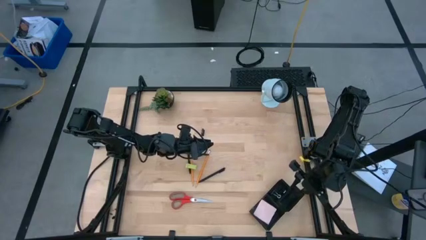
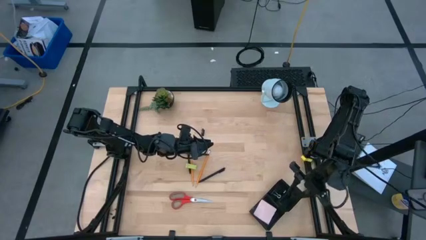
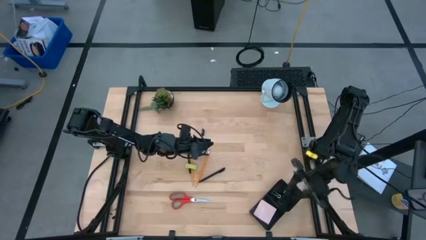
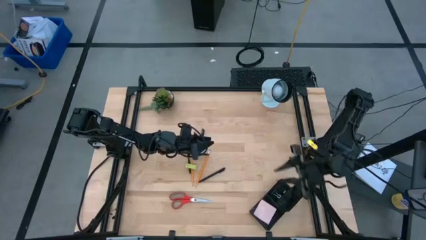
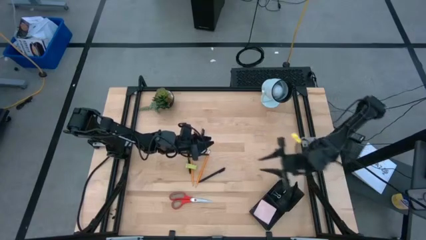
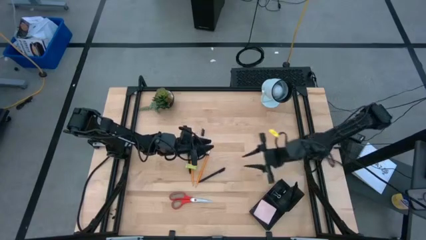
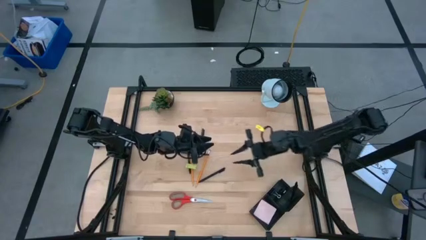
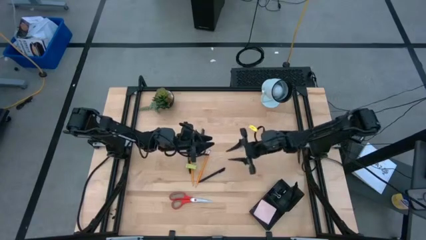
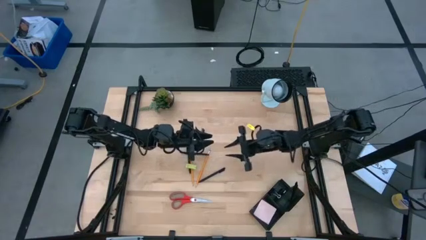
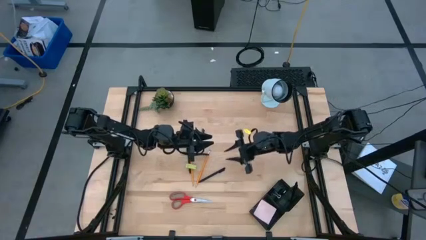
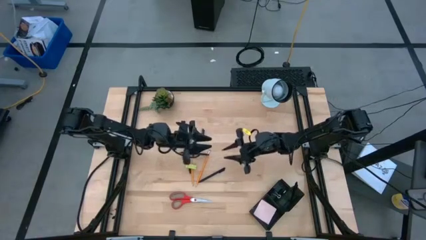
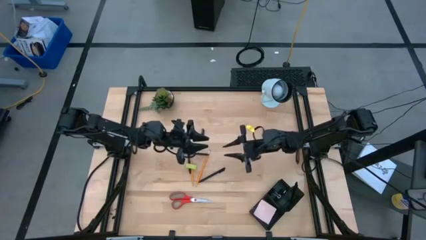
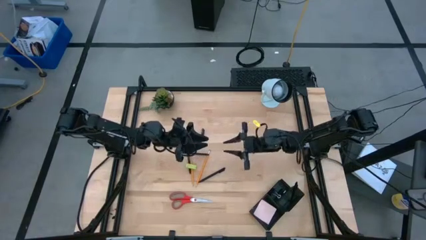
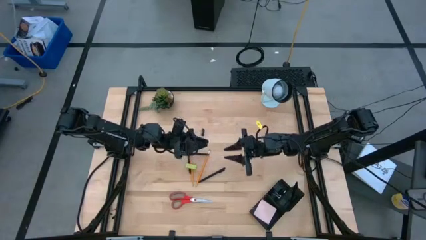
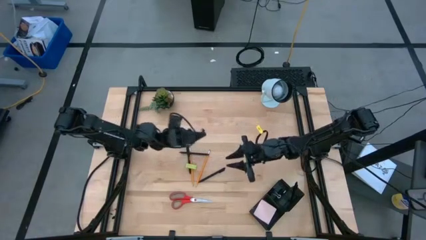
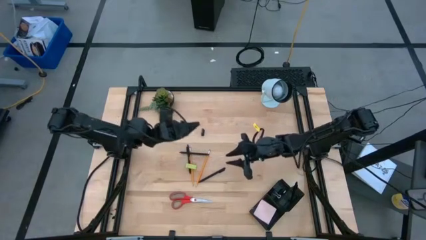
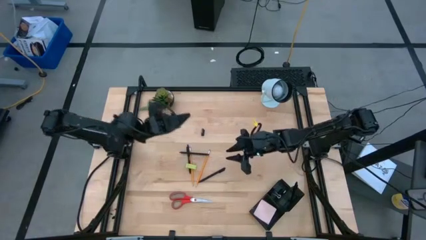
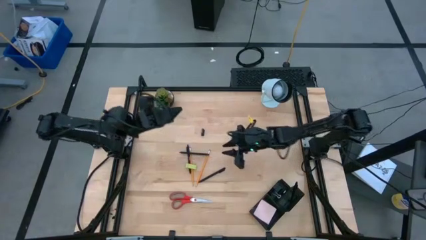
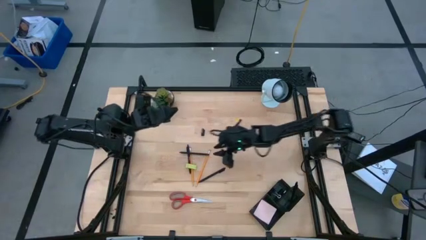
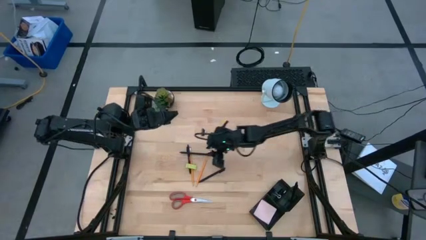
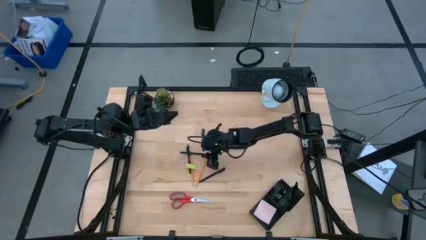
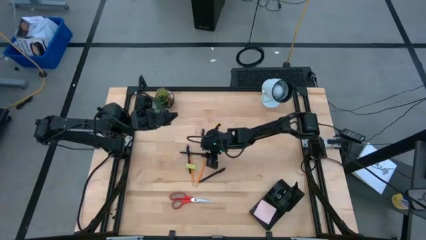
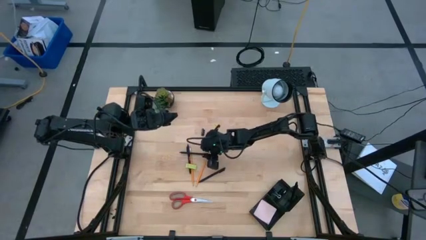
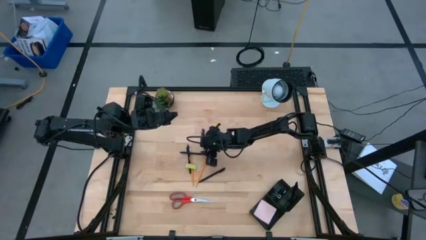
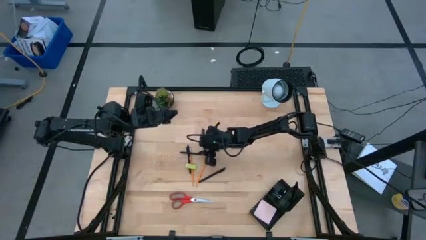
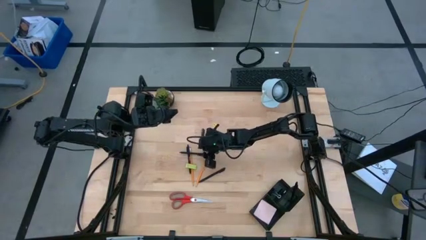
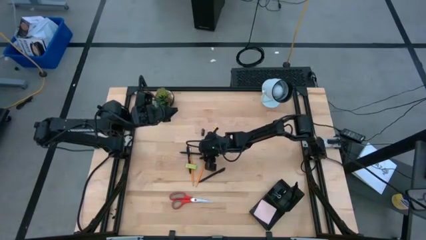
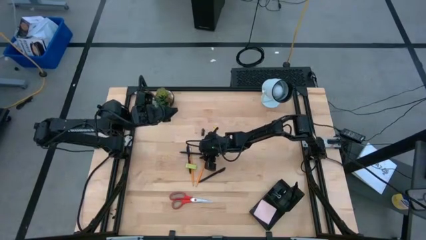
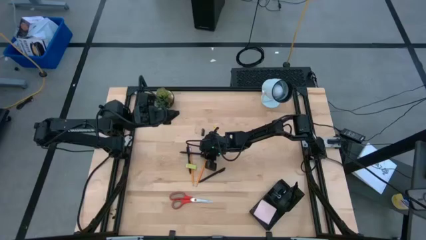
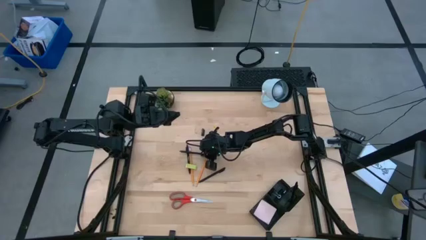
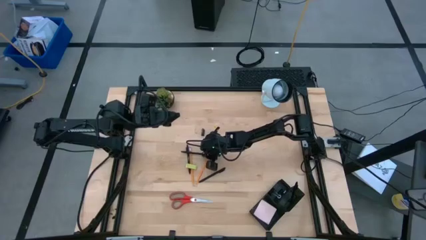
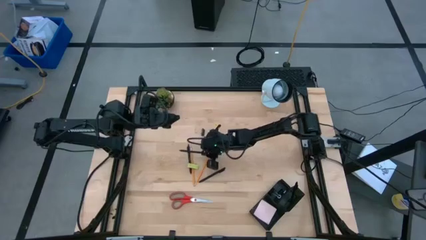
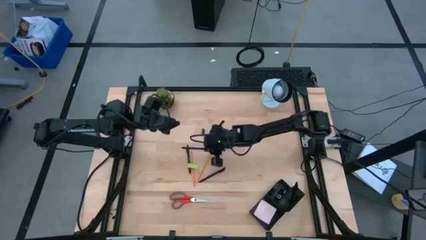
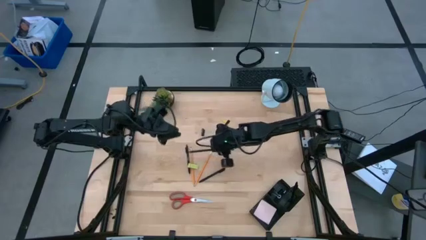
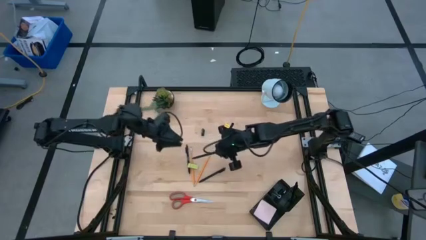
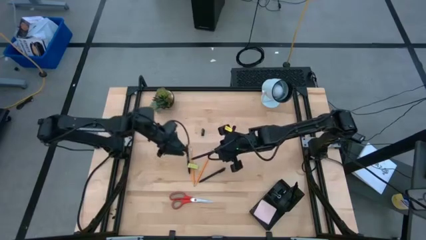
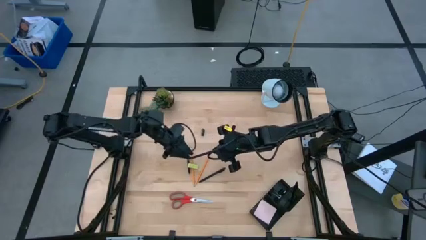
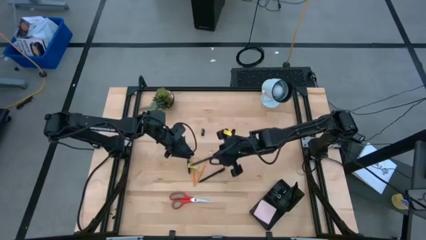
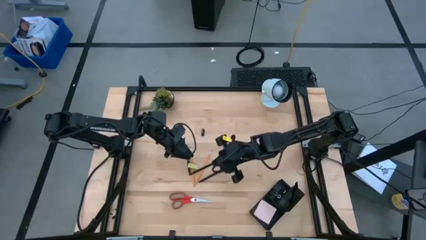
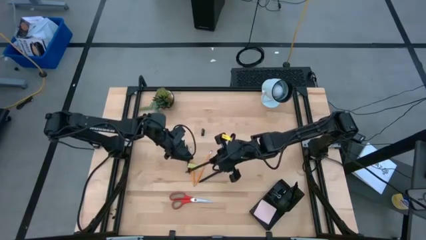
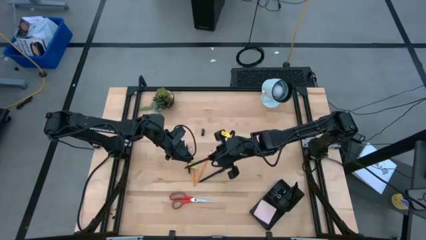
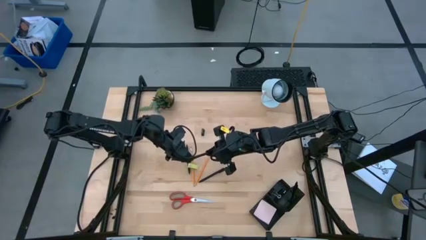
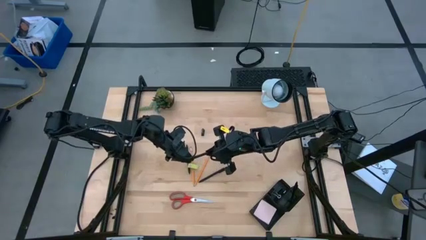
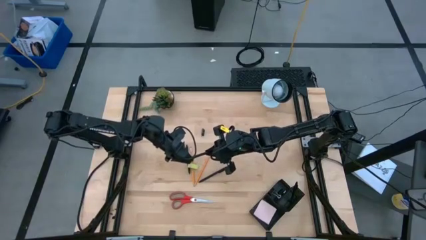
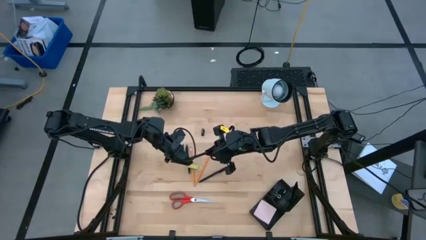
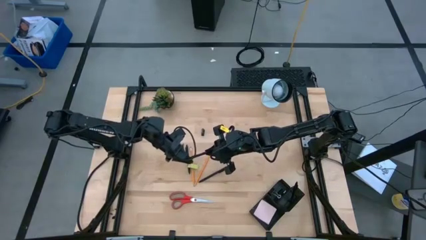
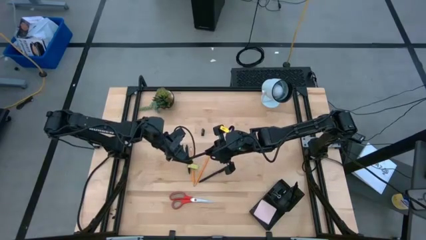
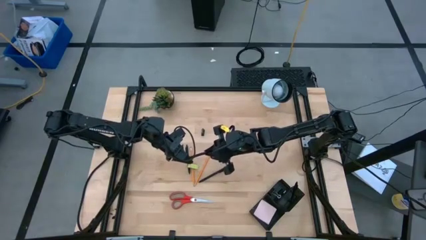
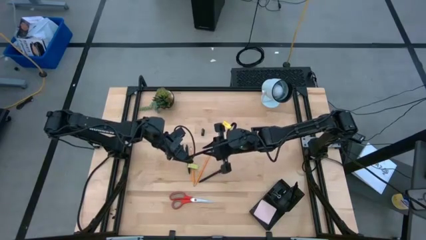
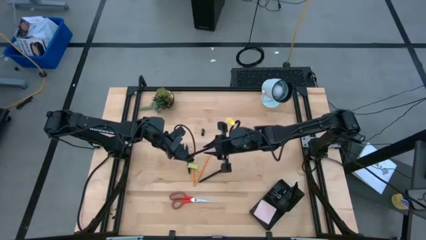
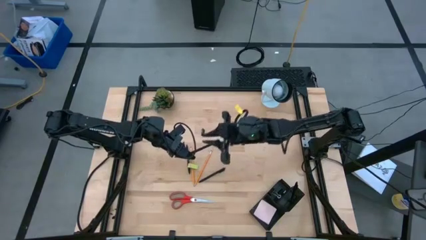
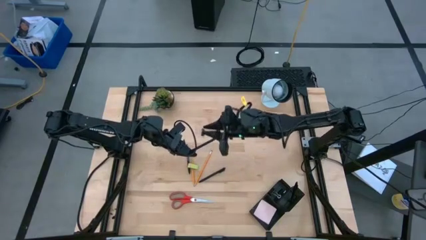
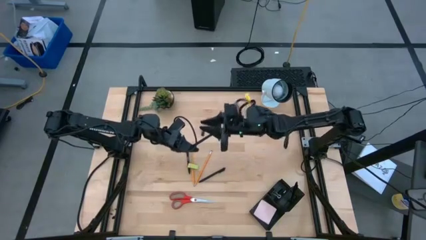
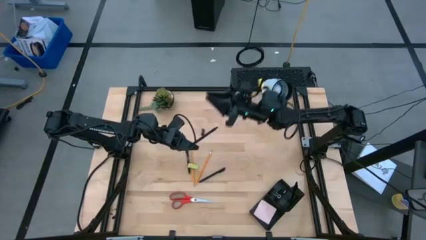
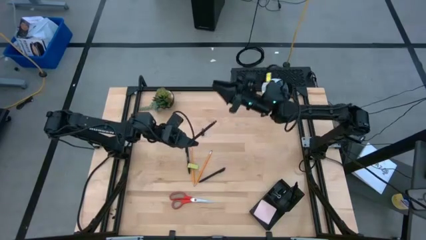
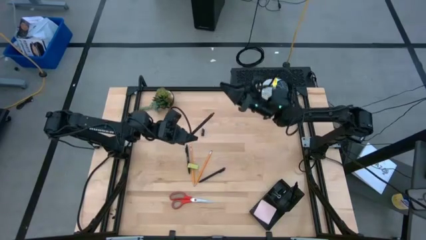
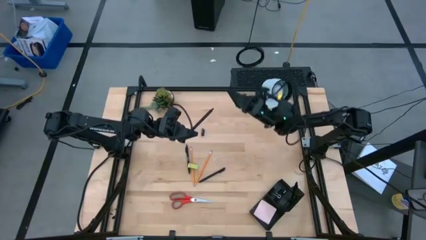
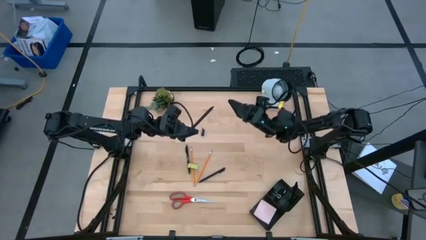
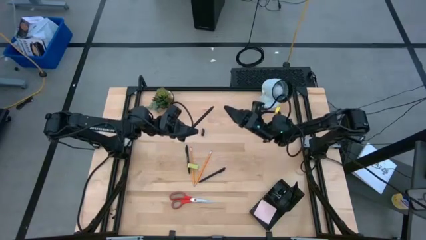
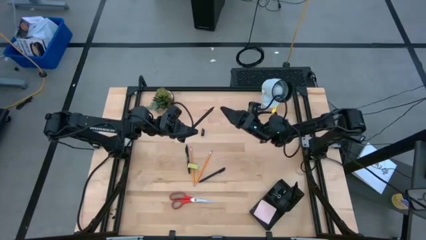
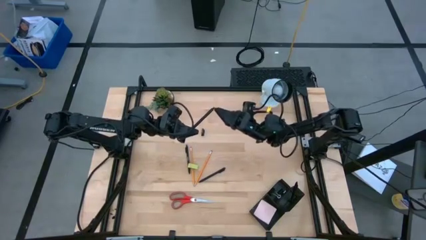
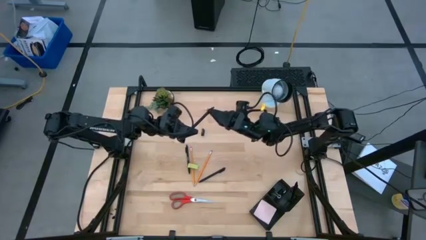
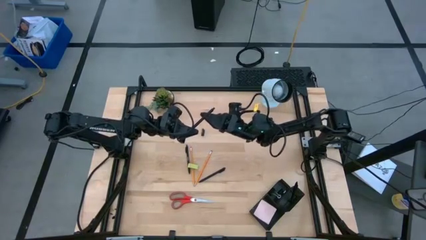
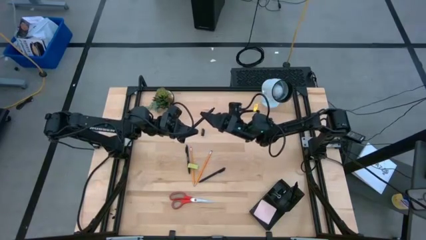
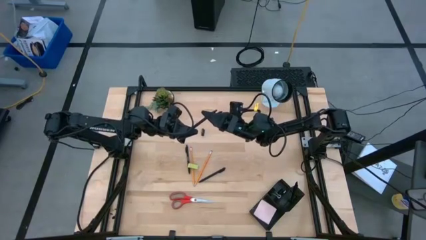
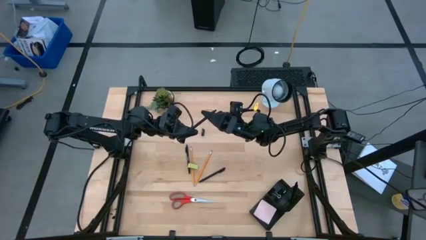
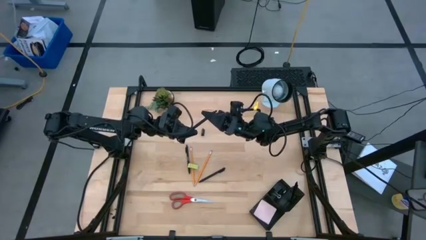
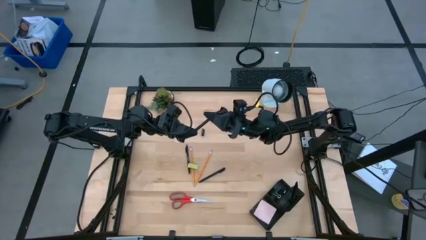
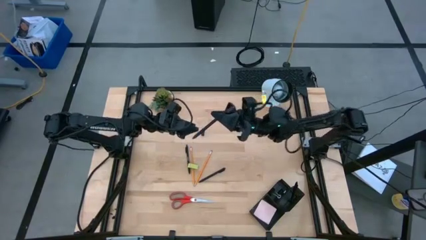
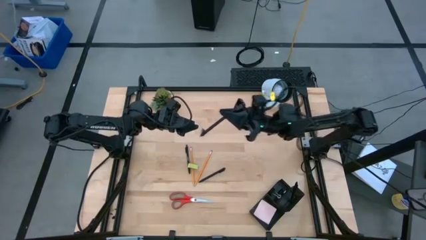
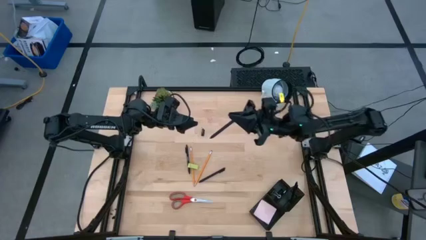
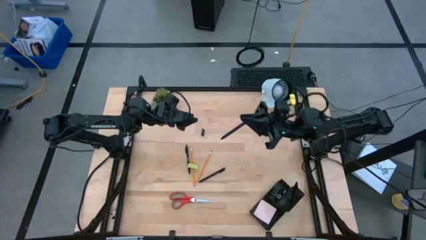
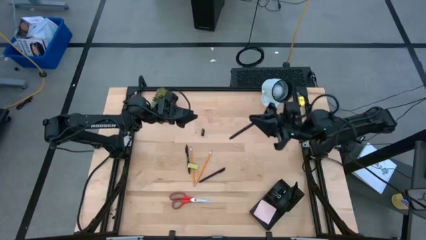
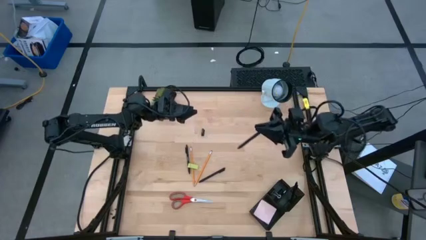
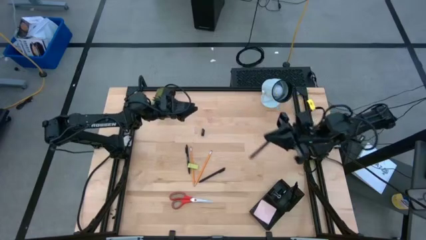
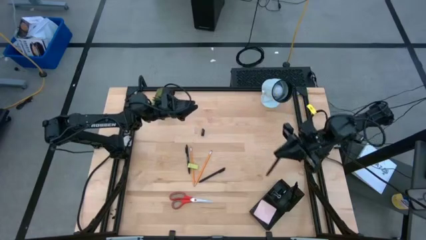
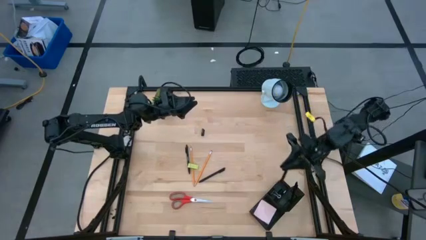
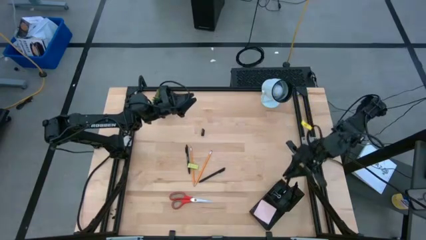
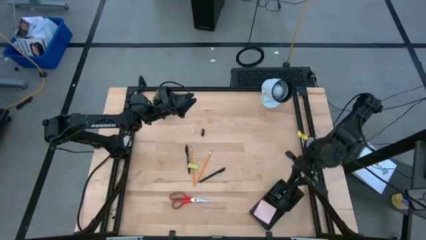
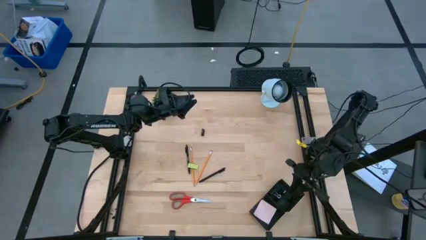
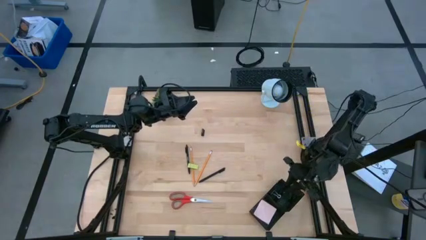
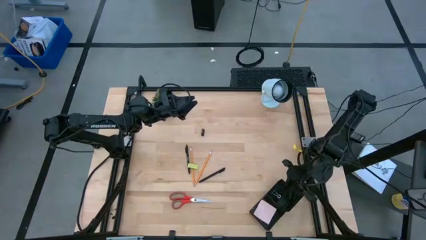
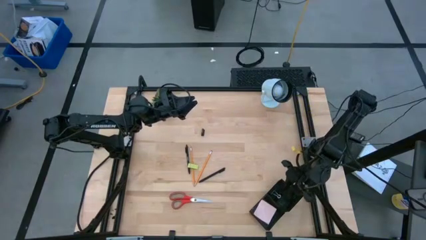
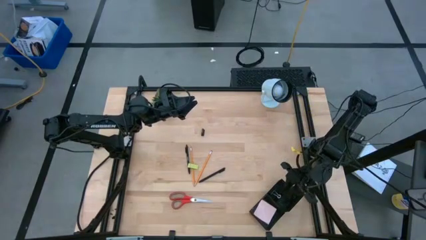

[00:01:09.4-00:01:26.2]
Task: Pick and place office supplies into organizer
Put the black pen into the desk organizer
